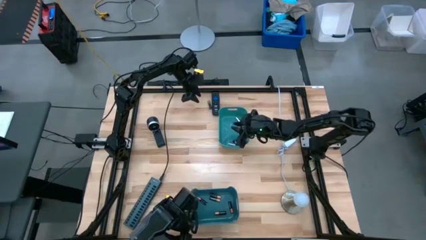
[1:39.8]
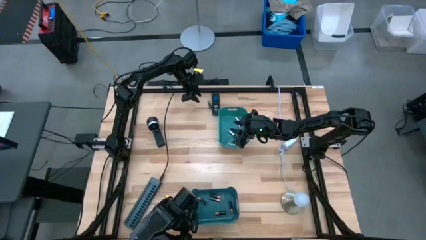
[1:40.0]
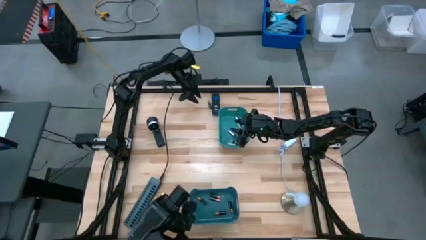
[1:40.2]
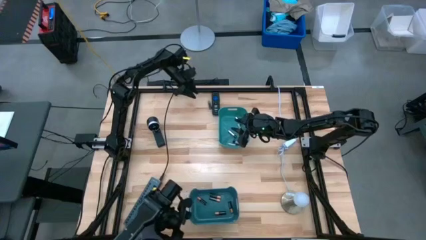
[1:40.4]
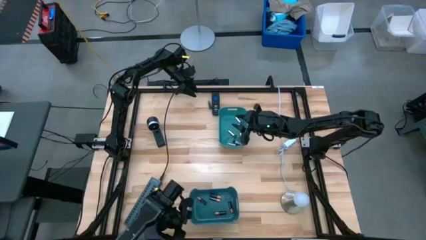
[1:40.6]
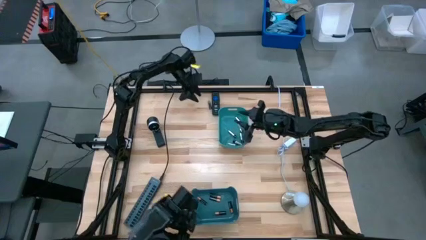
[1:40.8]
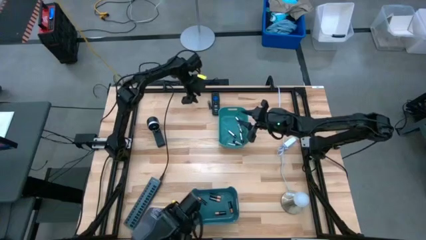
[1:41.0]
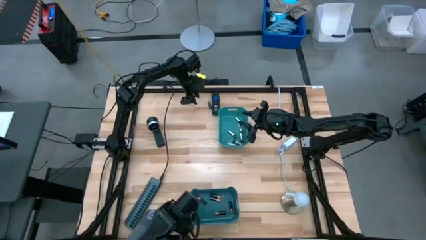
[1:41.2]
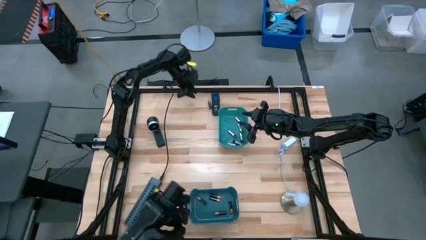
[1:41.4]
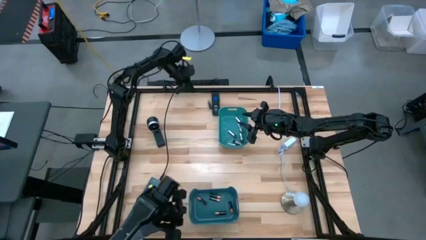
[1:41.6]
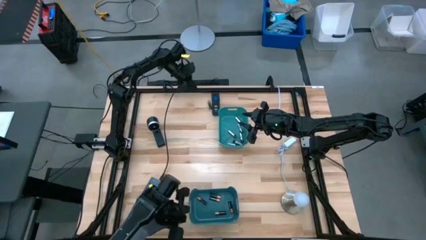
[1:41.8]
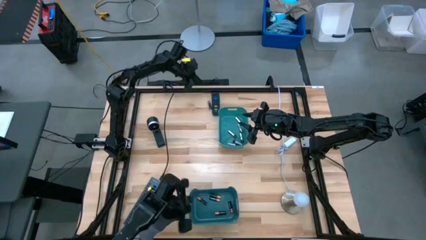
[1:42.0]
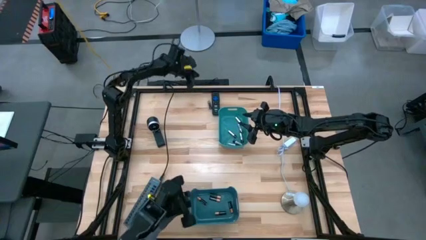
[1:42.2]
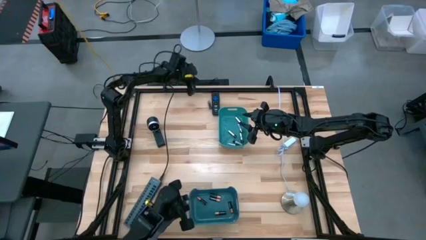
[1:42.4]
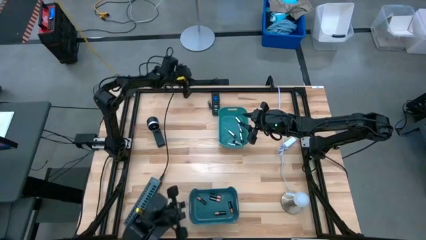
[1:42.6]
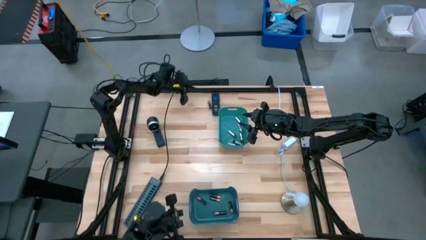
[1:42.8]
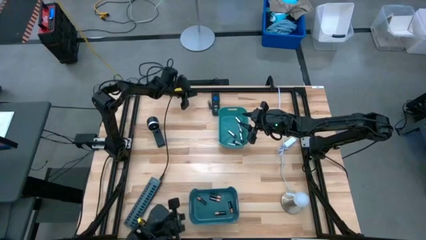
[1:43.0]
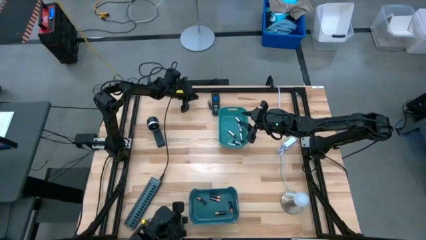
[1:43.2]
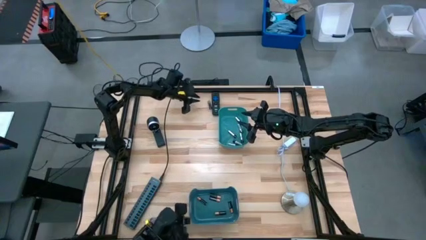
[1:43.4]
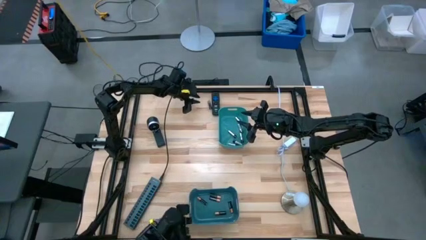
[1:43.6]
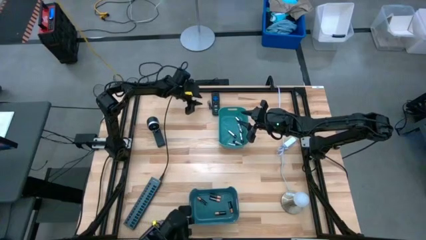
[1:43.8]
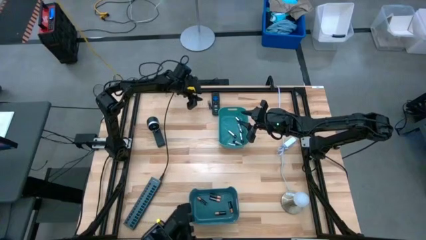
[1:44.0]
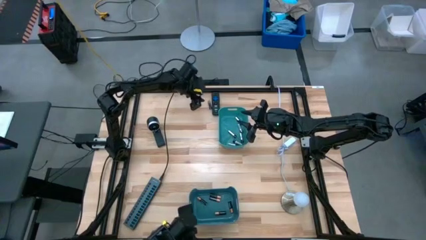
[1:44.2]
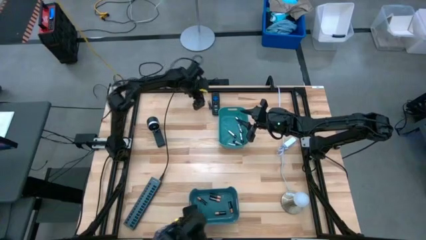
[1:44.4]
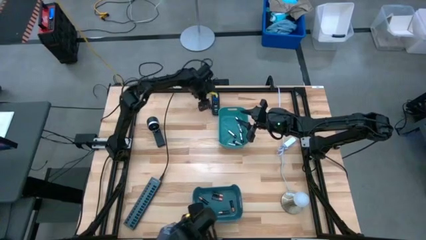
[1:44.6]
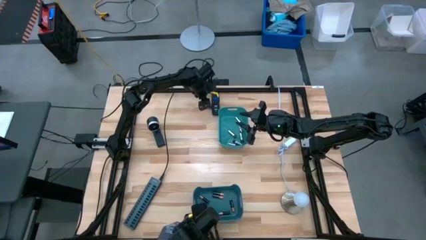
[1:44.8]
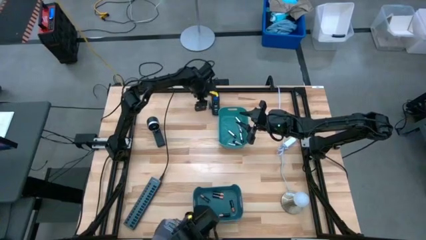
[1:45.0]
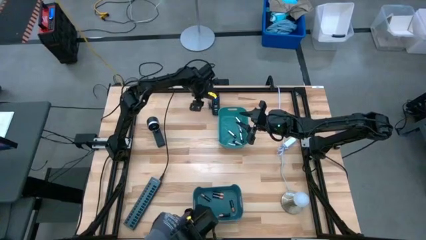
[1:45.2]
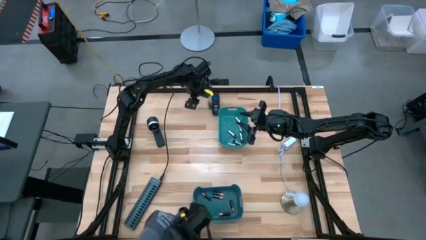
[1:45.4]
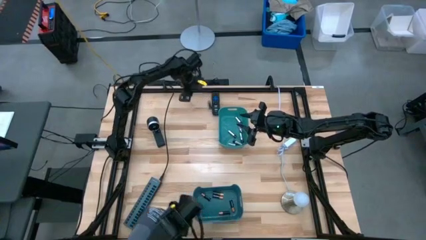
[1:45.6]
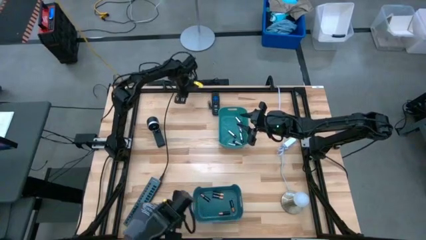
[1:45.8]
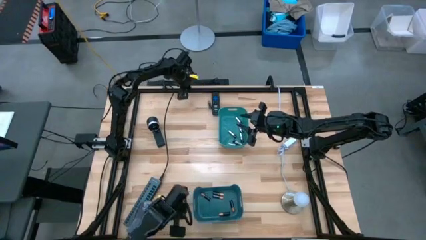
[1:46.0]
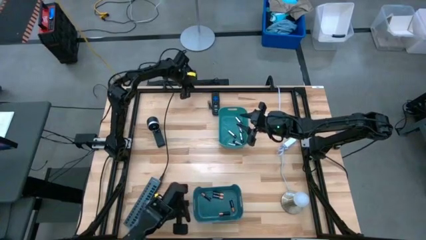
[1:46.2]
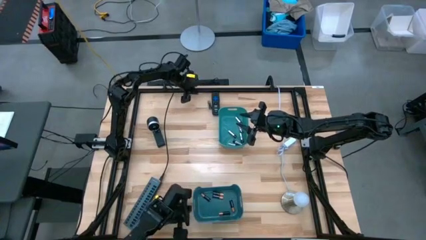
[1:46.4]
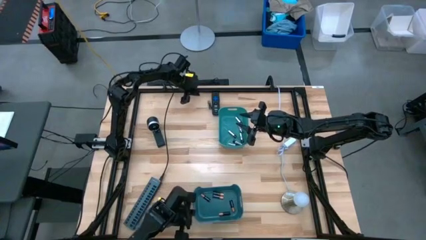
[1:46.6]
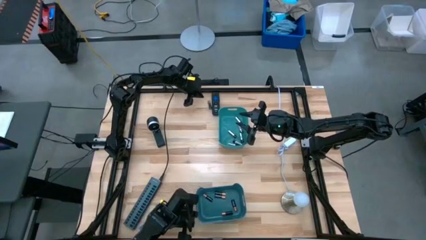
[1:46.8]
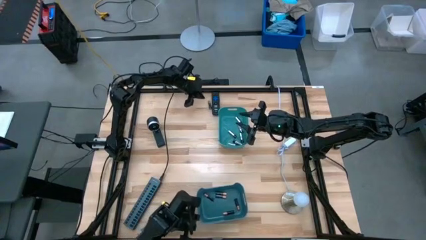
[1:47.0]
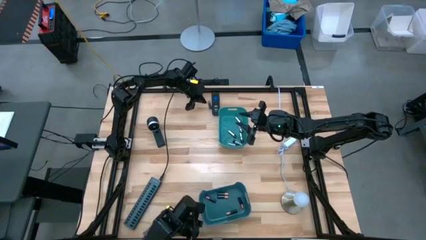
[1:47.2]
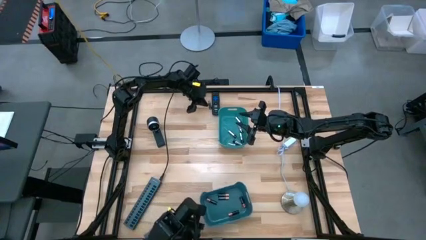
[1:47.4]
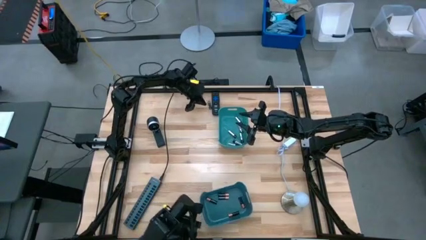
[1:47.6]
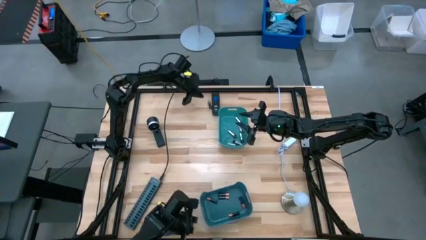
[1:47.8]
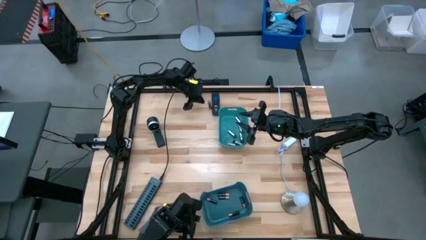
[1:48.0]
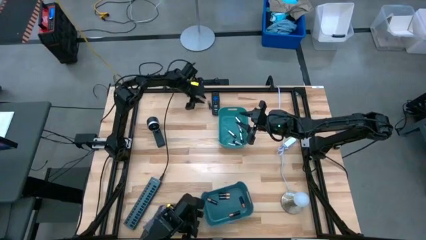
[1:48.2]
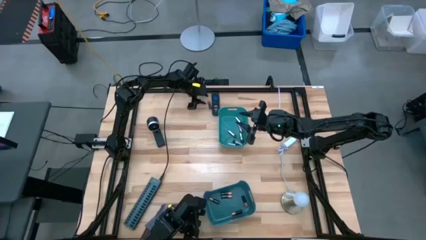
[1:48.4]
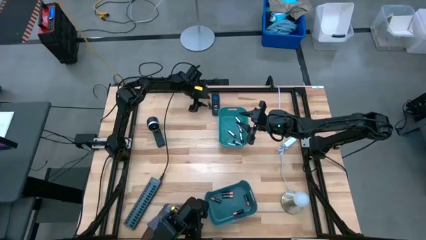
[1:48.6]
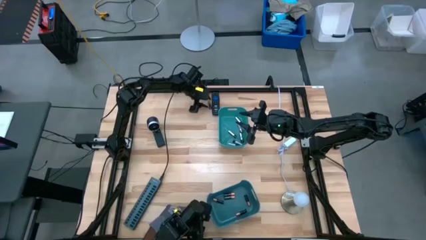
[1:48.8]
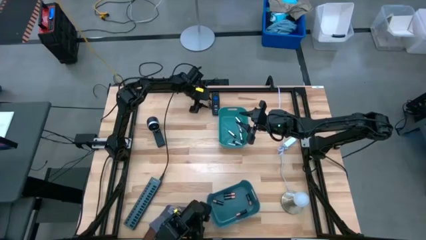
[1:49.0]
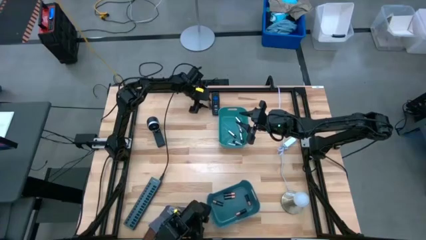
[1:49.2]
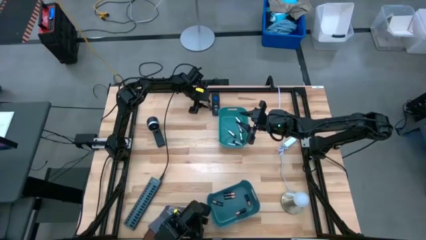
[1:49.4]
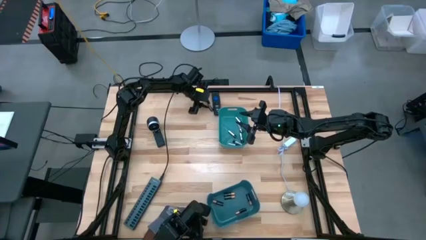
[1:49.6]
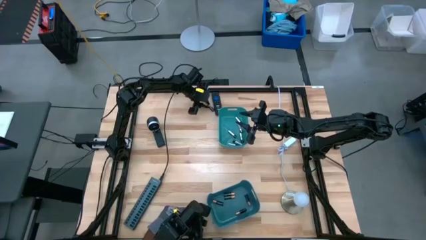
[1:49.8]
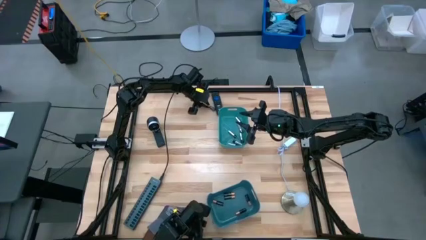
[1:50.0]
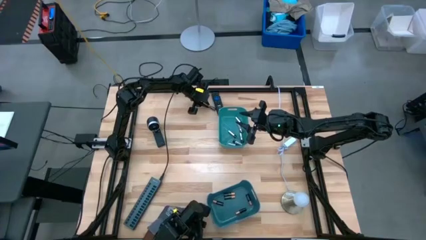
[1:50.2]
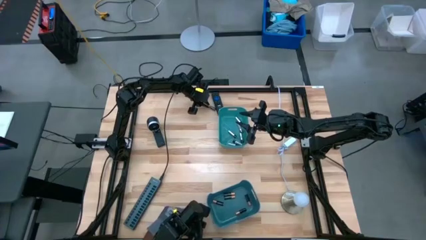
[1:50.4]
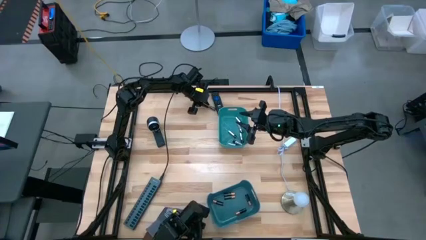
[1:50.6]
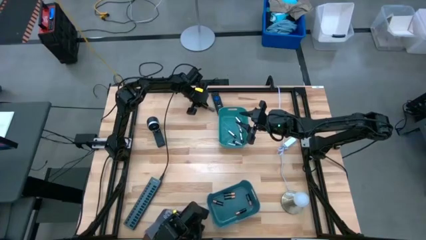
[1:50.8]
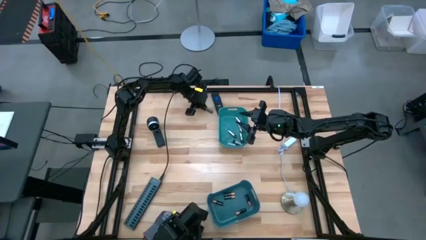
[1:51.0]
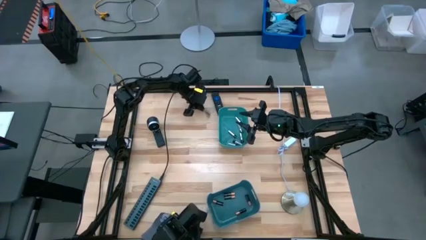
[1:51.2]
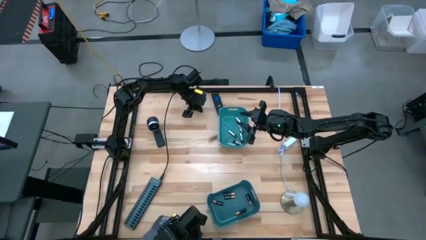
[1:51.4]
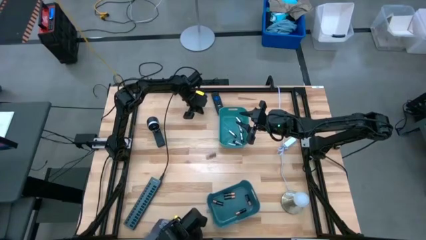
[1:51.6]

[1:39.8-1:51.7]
Task: Sort batteries
Put the black battery into the blue bin

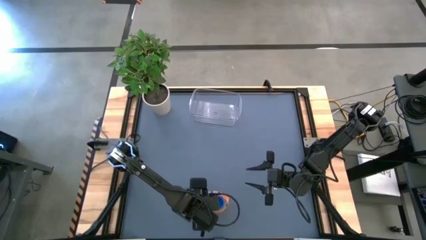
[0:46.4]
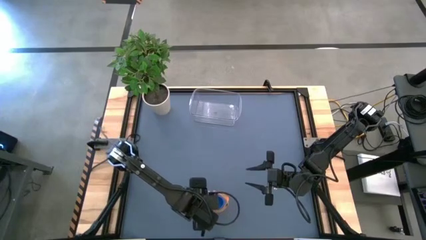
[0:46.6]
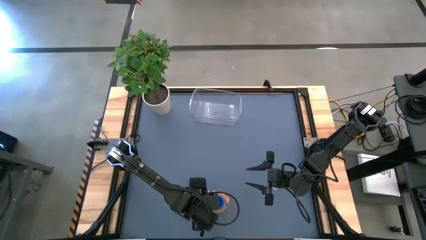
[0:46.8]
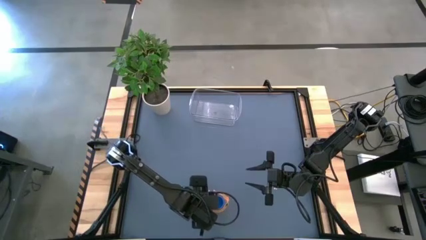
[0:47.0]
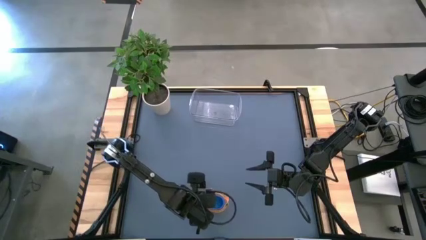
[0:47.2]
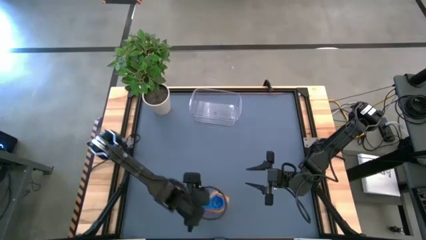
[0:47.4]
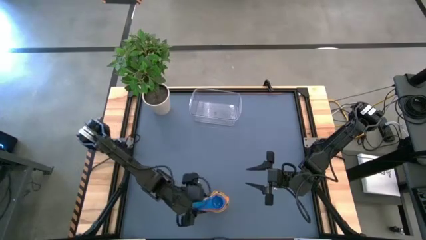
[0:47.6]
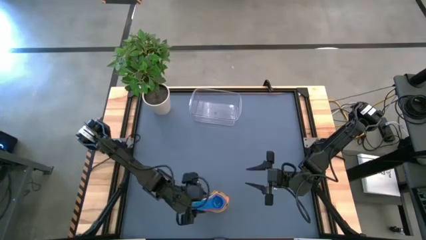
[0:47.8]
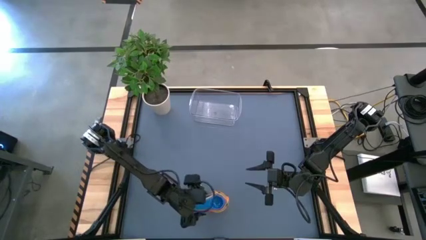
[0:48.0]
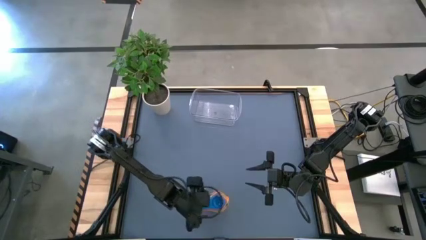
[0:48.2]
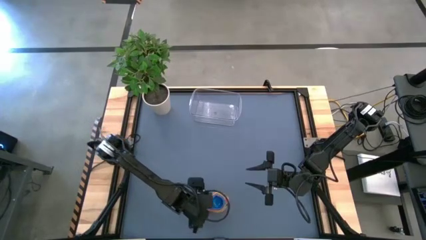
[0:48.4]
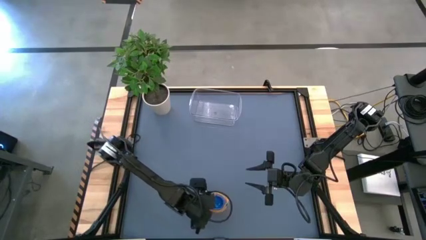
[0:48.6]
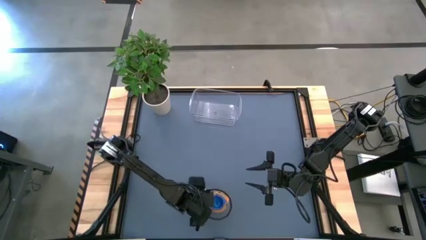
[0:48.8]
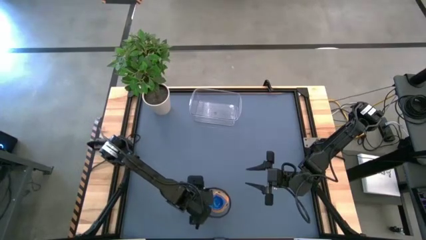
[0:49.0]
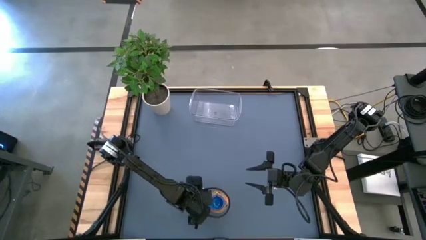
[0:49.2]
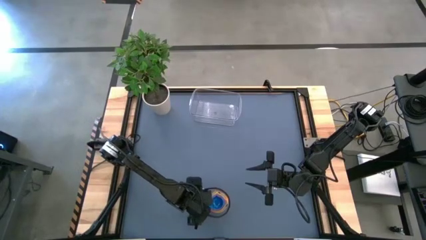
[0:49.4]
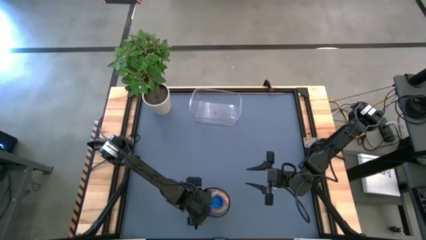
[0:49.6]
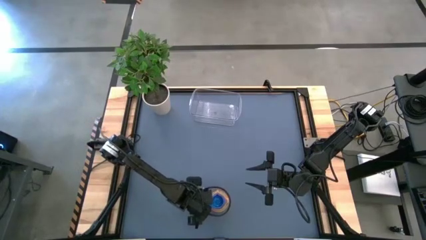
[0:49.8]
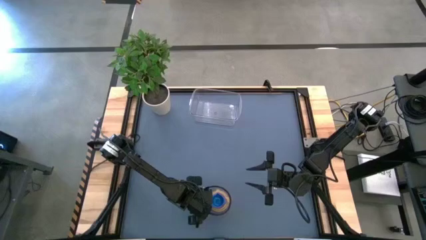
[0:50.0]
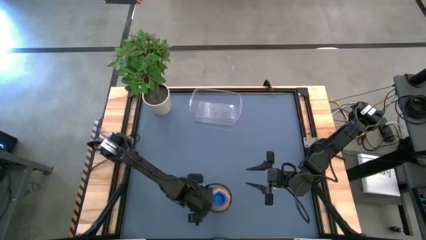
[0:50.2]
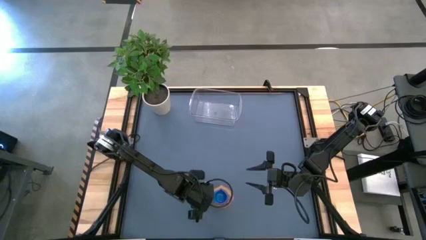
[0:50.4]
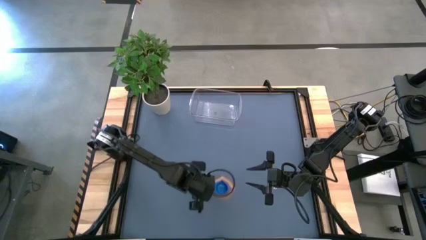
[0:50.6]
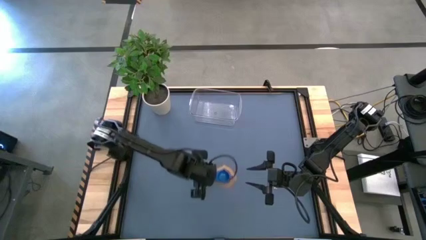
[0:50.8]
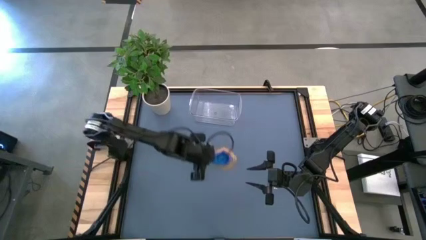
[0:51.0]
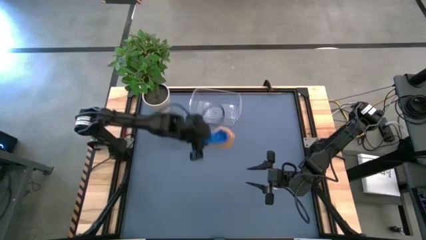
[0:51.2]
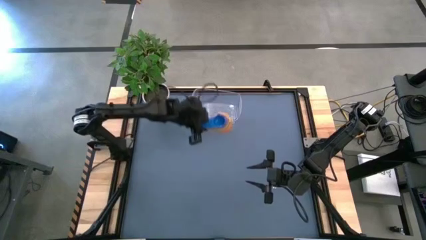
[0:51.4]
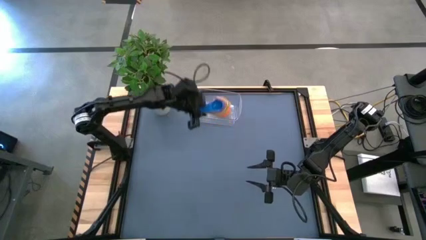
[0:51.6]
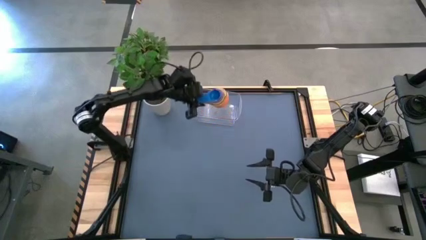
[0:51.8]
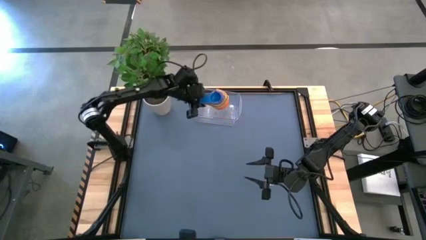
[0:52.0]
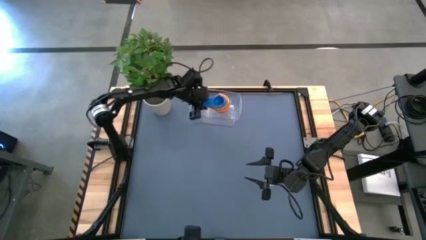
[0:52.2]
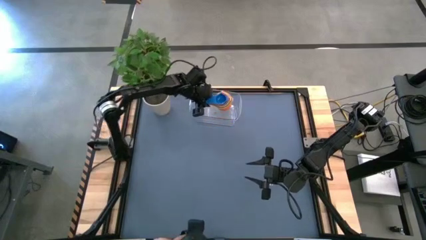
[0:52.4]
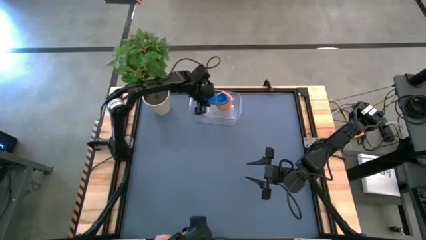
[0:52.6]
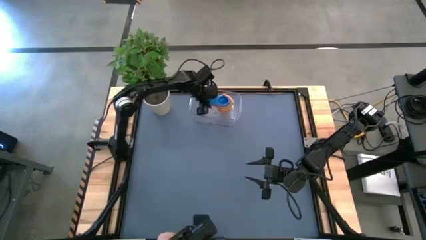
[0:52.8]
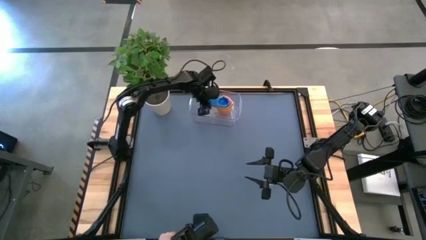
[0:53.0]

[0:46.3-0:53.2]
Task: Nest measuring cups in basket
Put the nested measuring cups into the top center bin
